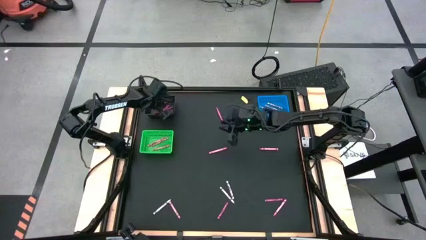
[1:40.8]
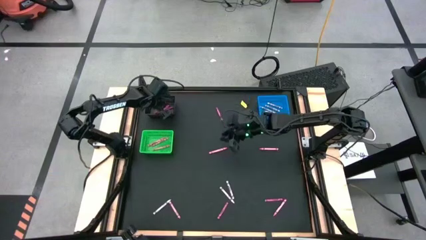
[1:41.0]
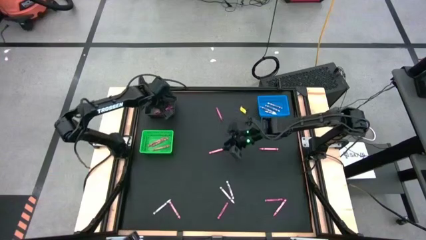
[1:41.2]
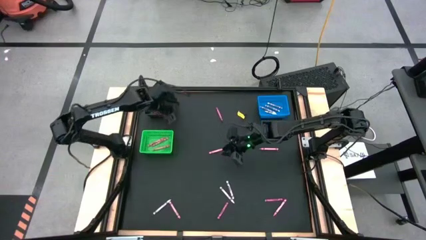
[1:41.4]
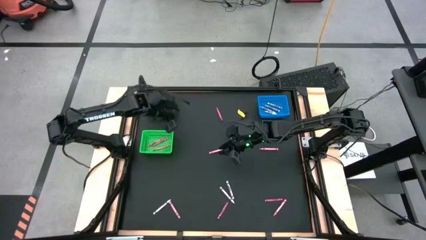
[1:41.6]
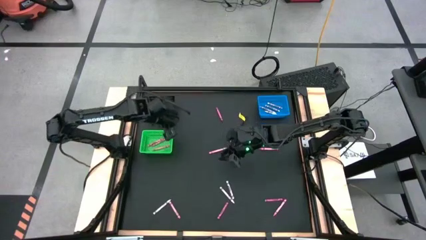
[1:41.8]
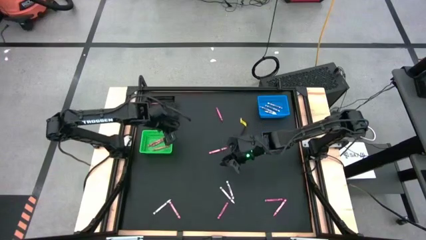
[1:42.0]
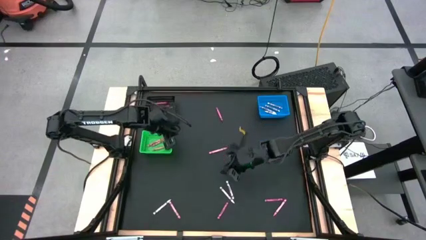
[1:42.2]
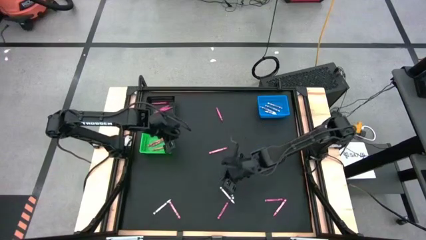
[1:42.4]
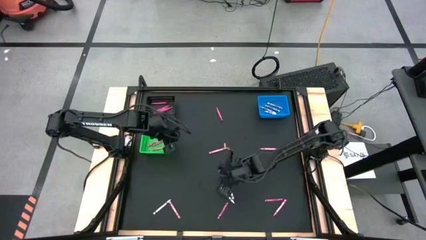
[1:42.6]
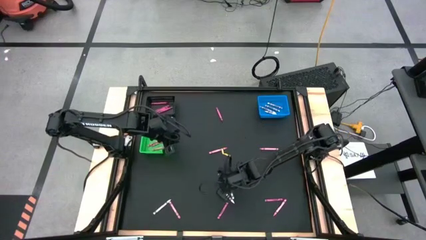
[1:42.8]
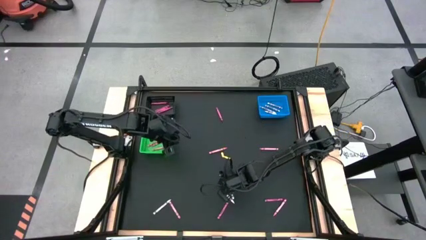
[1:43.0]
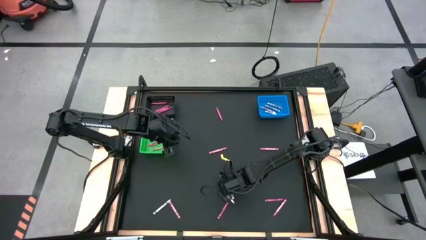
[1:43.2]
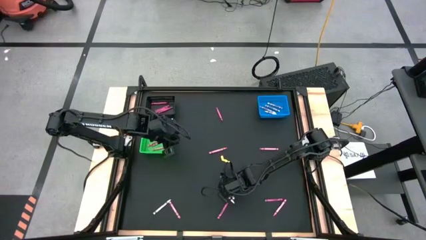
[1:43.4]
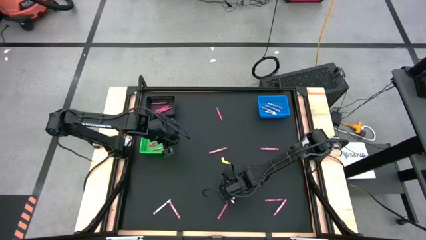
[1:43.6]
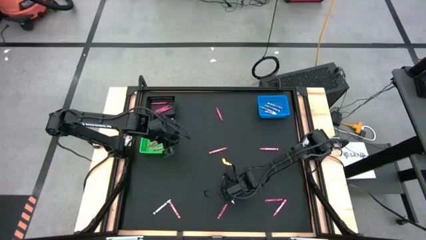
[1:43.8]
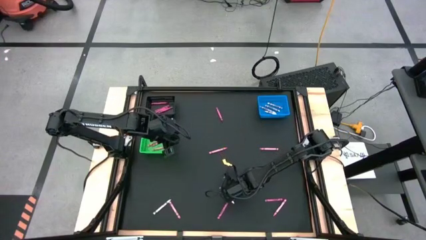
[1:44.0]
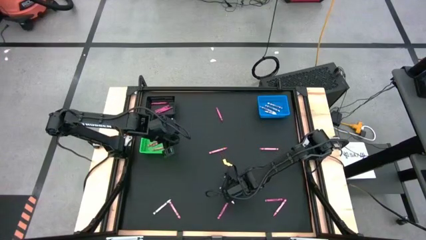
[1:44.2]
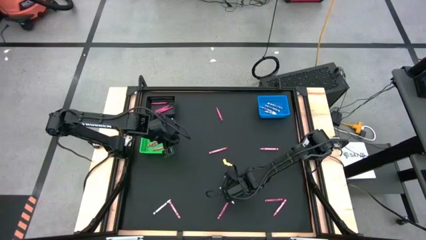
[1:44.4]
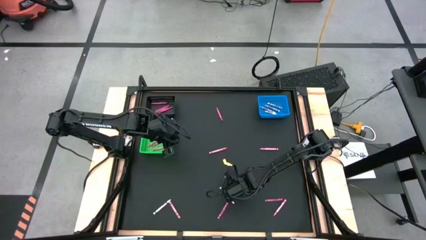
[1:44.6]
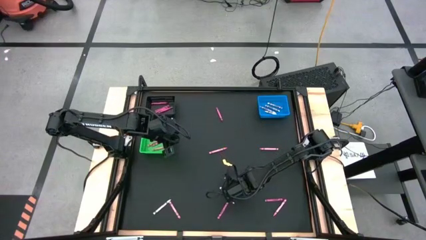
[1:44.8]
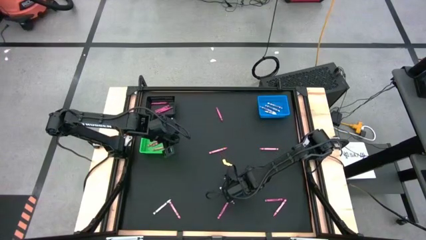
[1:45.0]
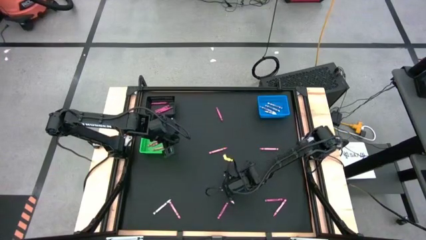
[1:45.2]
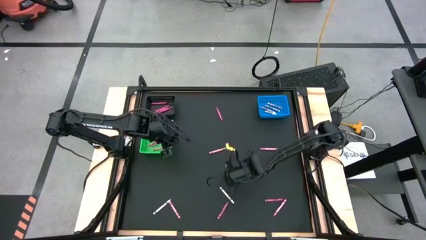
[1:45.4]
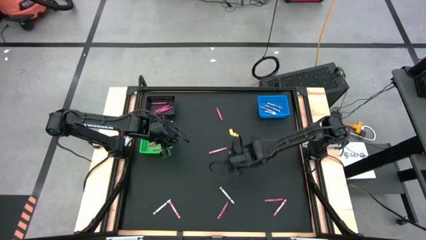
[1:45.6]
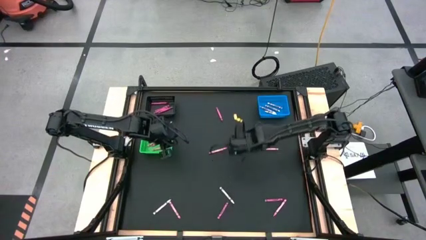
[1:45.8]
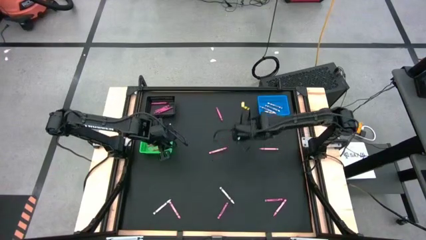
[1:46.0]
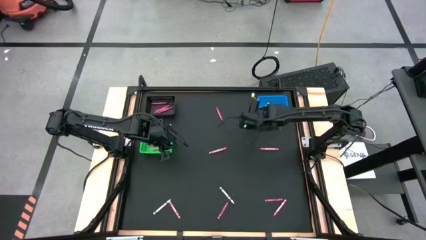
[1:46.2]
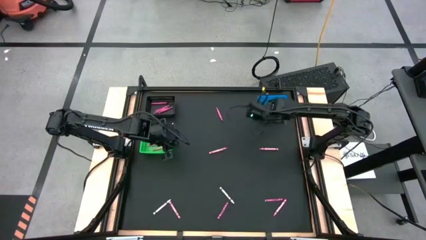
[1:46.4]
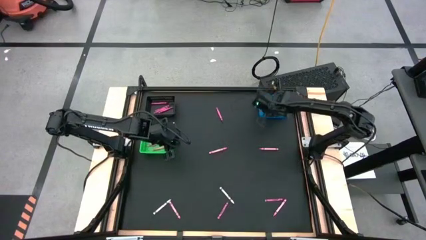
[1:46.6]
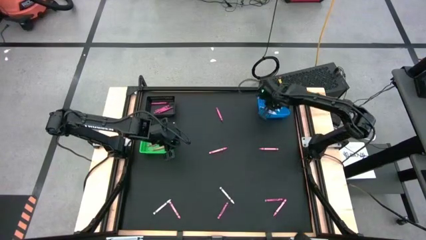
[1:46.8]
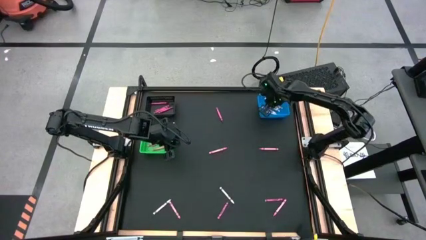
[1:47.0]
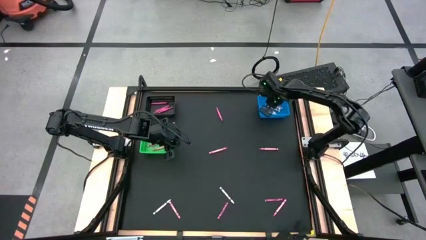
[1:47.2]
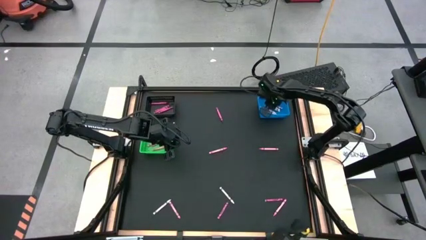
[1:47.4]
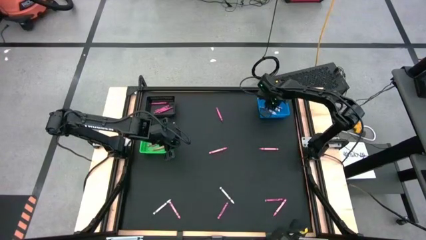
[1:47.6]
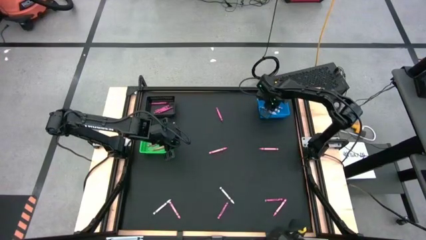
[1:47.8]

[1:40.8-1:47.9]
Task: Sort crayons
Put the white crayon into the blue bin

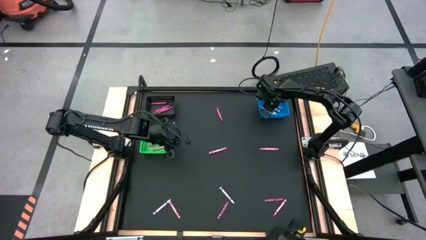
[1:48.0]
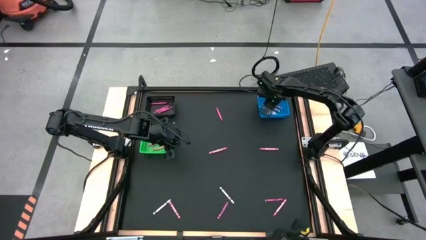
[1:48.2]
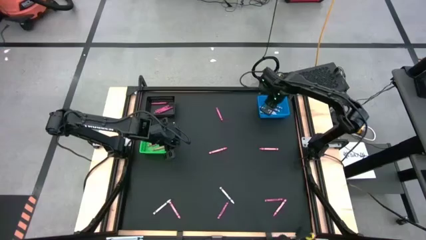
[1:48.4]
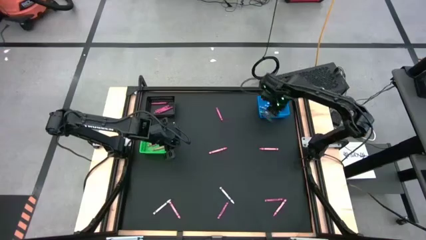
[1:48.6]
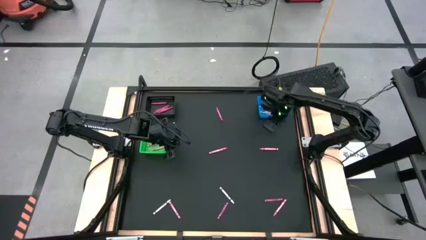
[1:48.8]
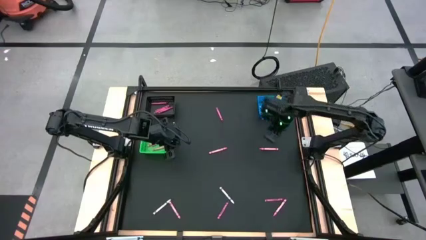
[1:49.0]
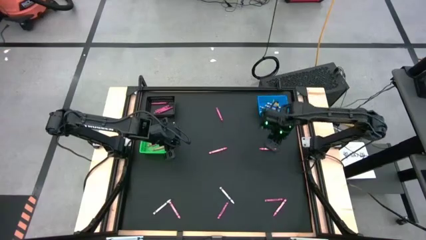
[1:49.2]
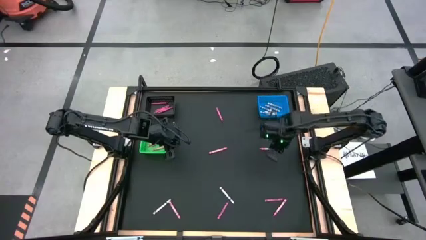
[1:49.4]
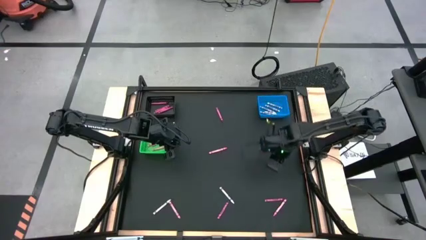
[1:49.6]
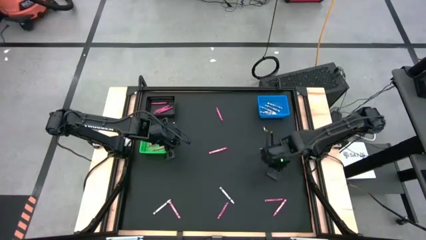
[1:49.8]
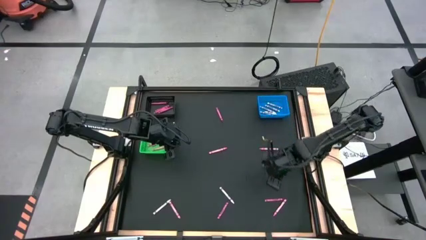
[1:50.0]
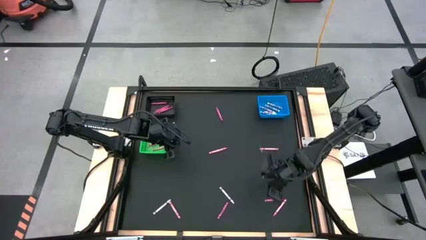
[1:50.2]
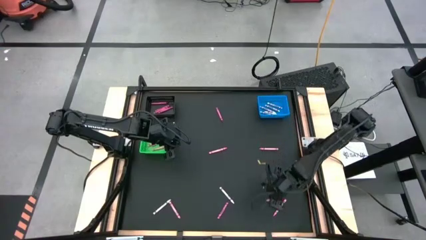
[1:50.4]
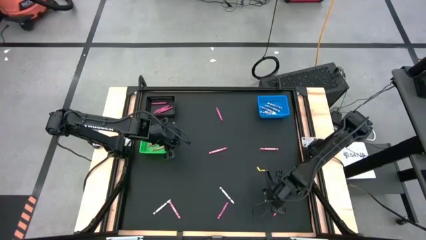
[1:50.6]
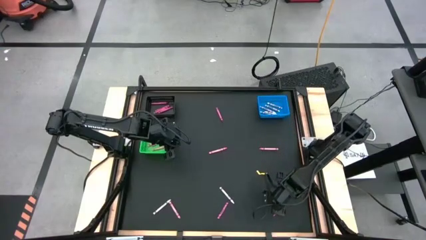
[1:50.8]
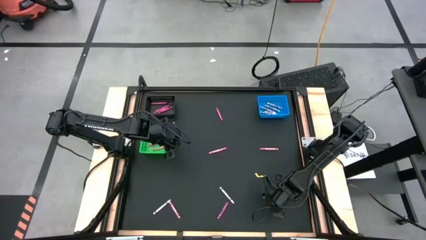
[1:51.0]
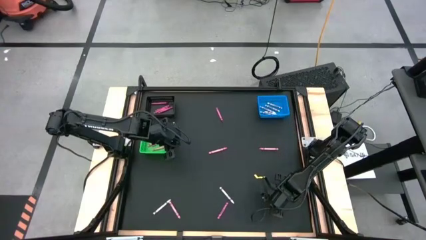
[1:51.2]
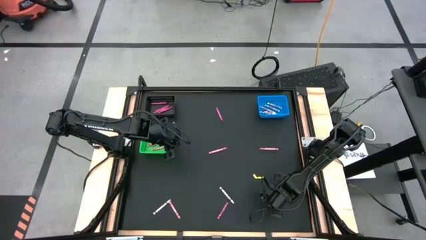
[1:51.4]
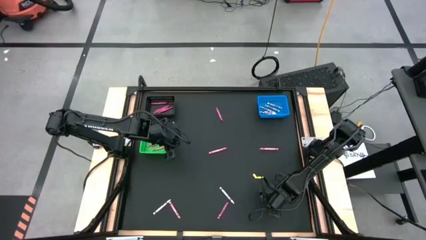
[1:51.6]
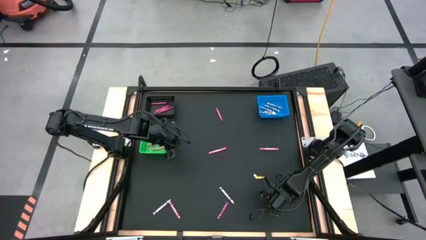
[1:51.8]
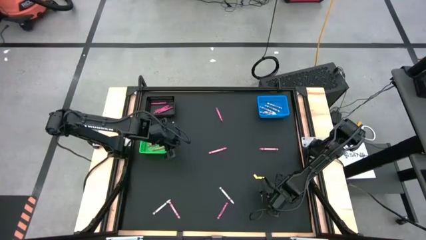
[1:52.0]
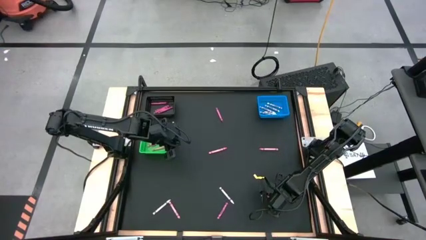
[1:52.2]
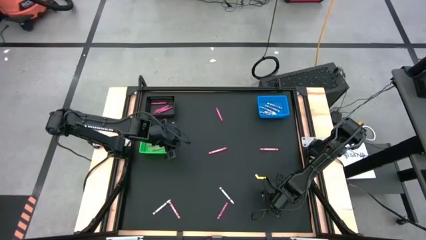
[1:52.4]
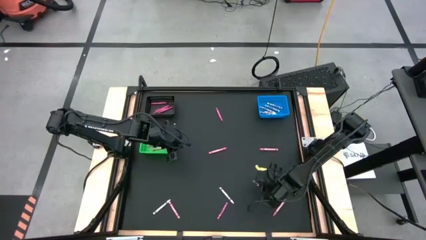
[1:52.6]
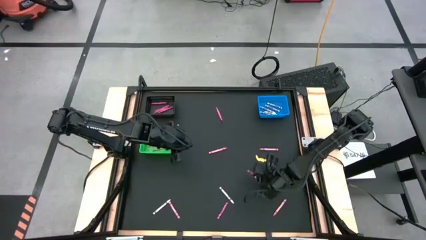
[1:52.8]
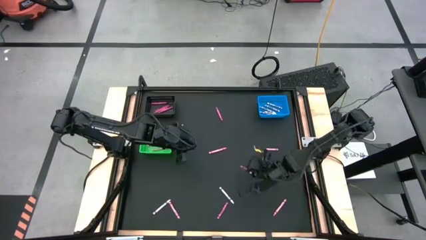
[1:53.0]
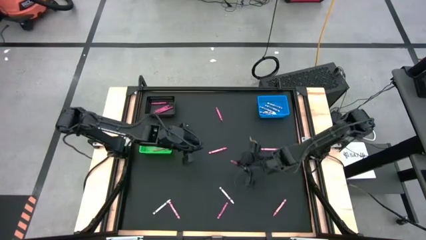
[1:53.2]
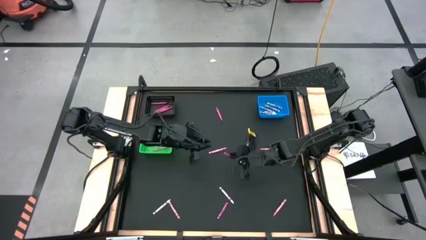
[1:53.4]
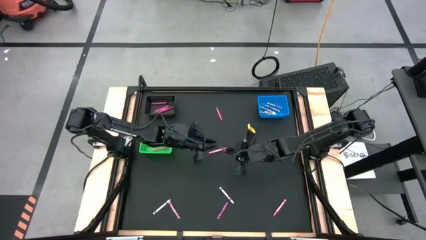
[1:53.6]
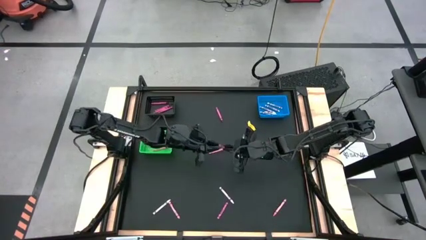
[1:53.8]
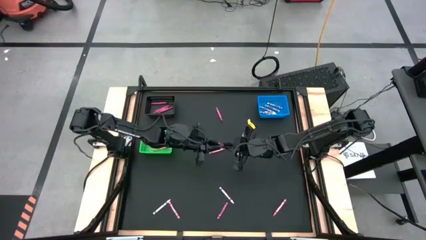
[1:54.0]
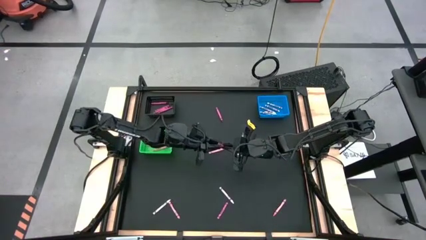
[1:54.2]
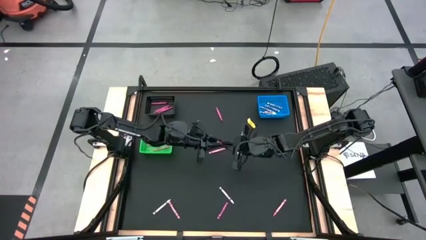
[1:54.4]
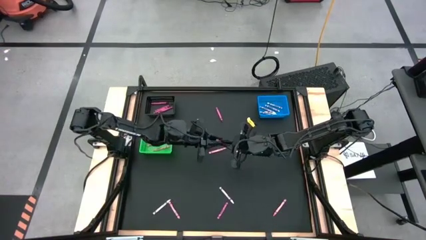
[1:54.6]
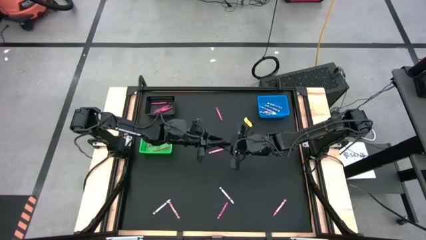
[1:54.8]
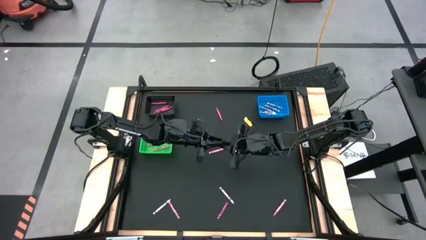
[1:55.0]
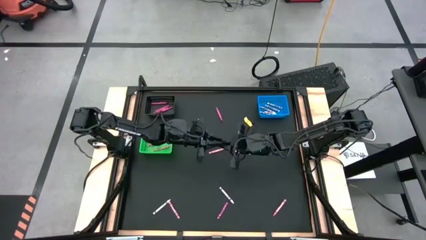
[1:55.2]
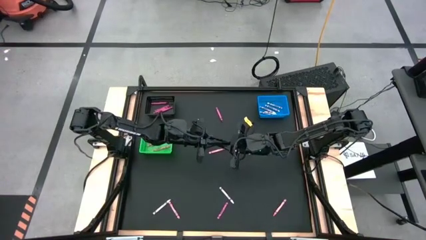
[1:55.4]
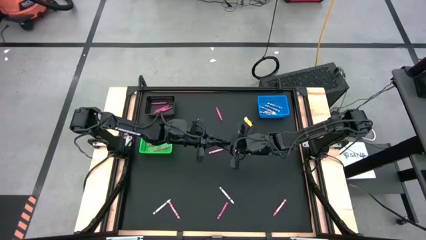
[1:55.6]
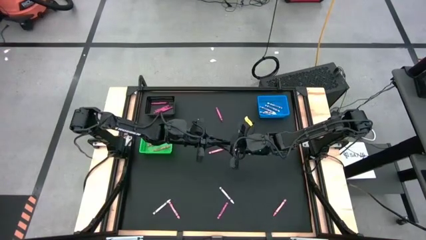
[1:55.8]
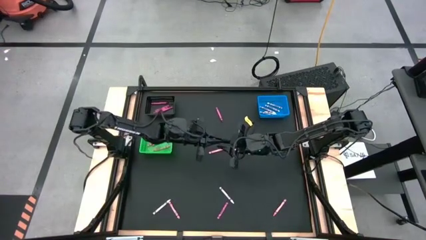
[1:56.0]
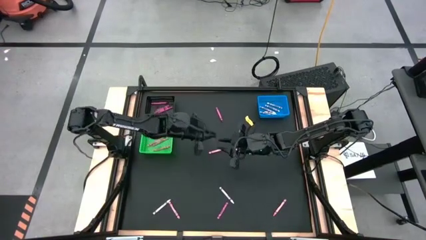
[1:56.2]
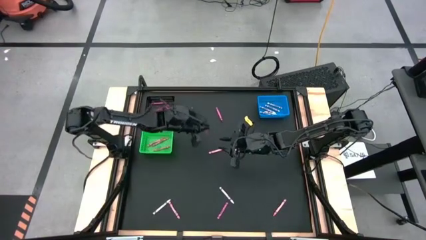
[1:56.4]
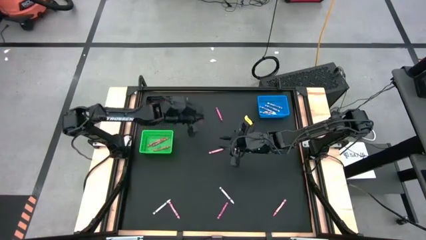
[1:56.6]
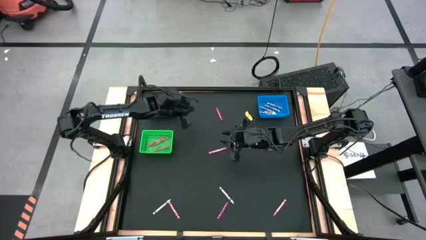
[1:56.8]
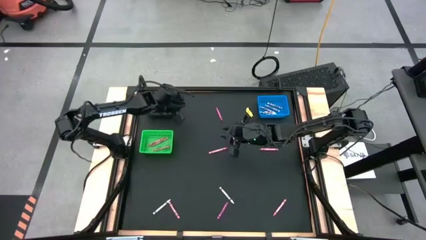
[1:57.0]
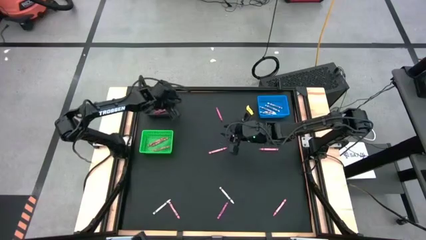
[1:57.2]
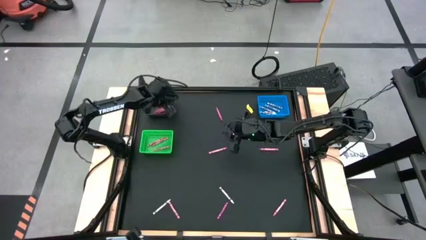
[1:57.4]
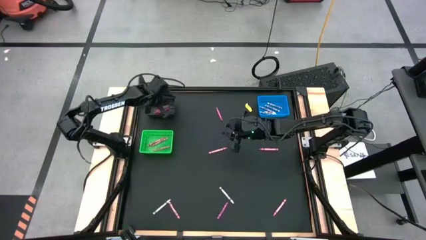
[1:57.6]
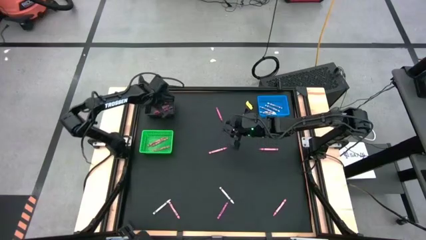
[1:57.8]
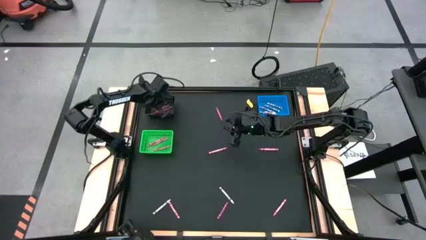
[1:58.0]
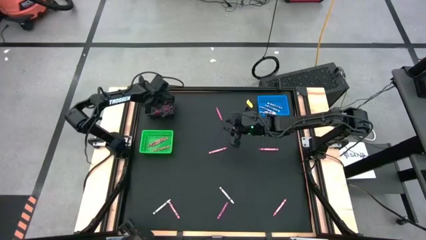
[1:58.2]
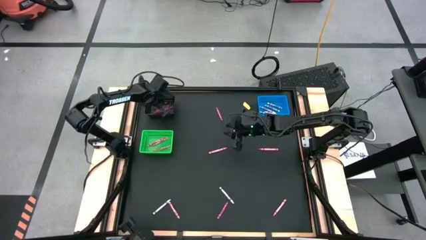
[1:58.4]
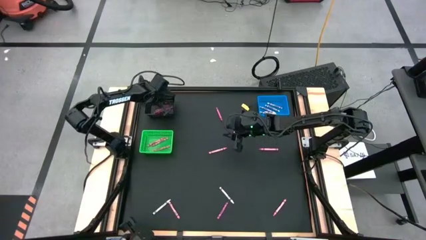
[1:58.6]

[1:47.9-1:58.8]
Put the red crayon into the black bin
